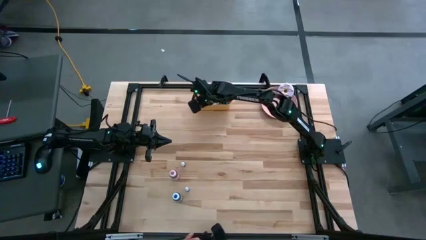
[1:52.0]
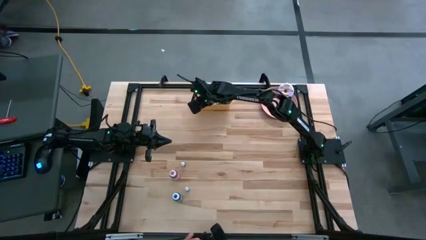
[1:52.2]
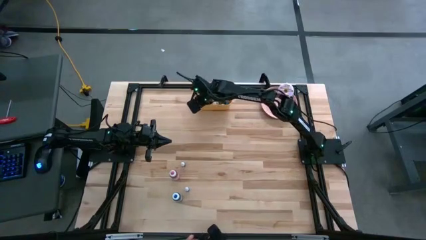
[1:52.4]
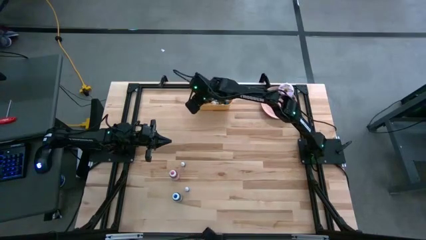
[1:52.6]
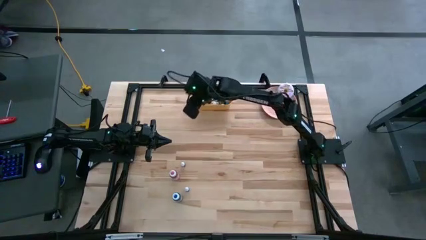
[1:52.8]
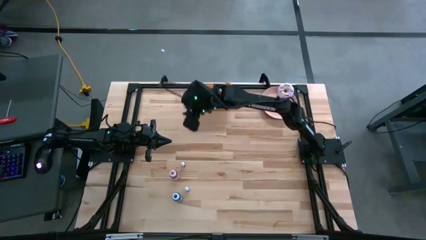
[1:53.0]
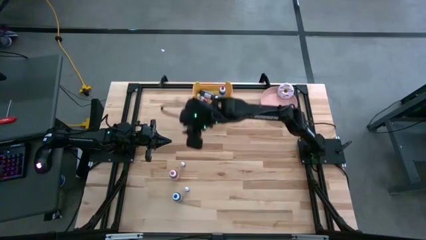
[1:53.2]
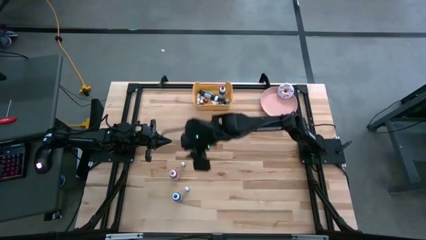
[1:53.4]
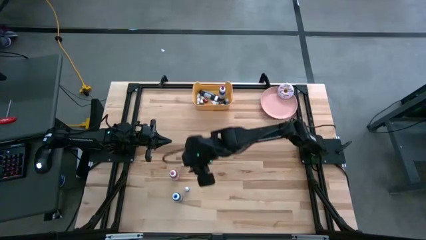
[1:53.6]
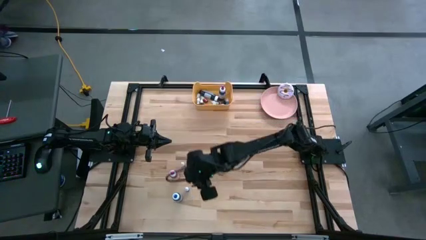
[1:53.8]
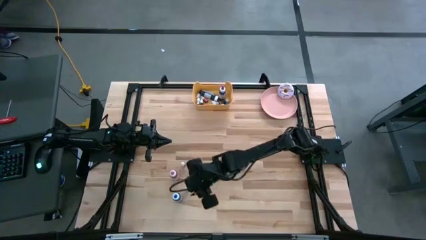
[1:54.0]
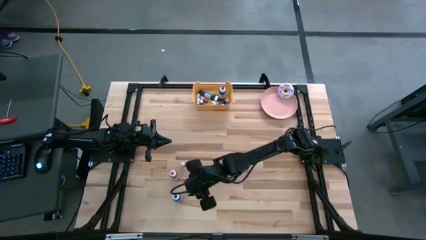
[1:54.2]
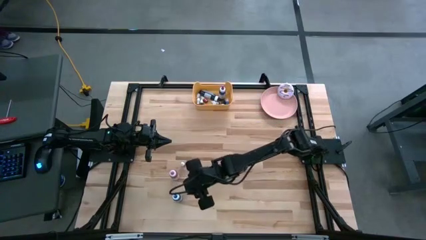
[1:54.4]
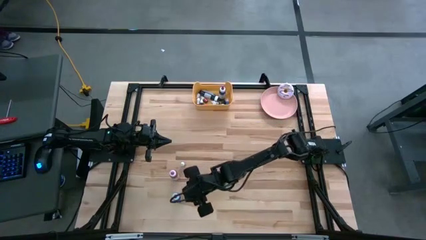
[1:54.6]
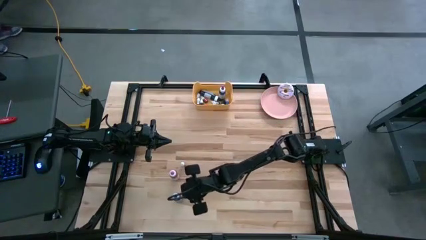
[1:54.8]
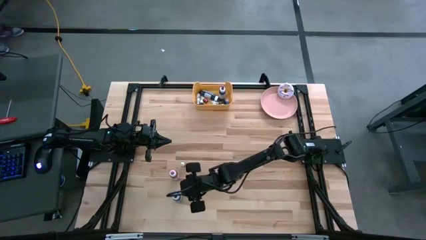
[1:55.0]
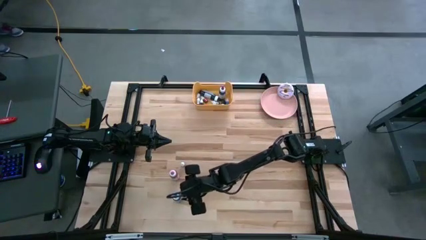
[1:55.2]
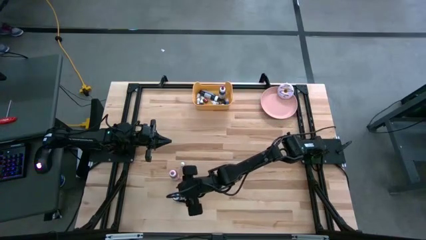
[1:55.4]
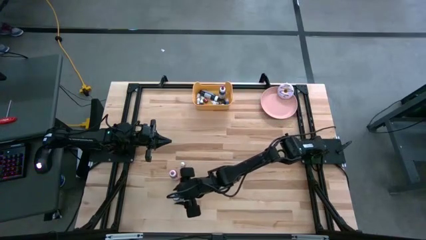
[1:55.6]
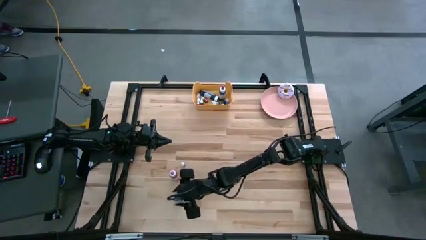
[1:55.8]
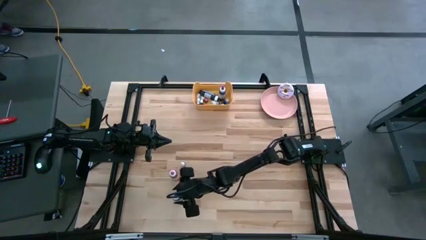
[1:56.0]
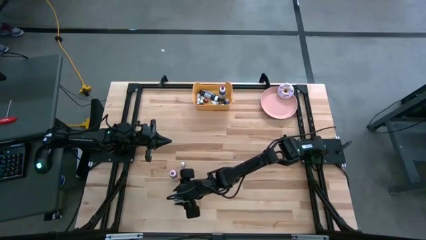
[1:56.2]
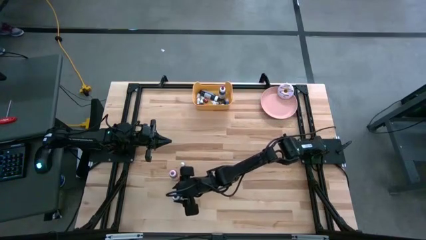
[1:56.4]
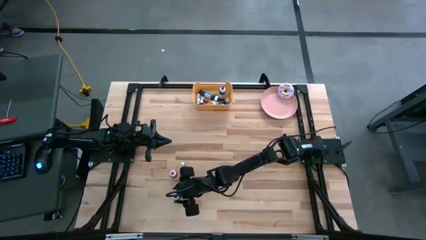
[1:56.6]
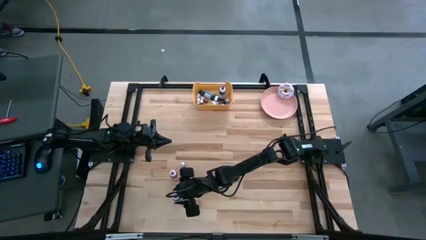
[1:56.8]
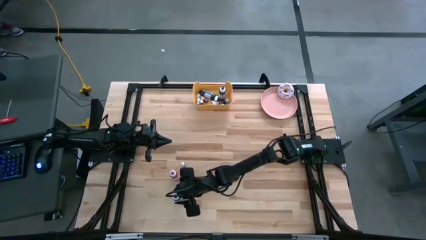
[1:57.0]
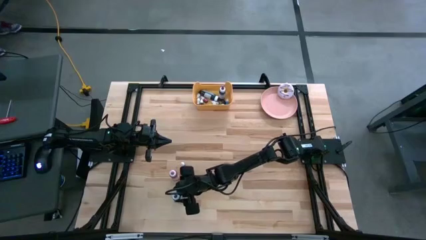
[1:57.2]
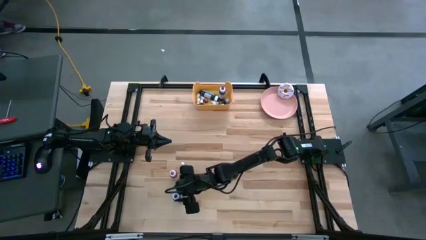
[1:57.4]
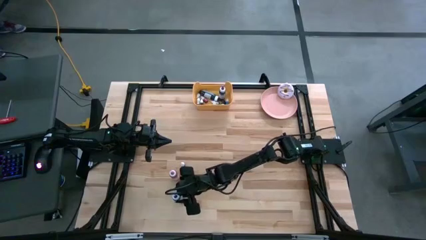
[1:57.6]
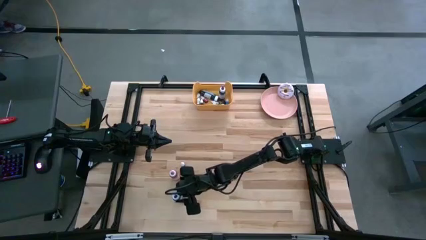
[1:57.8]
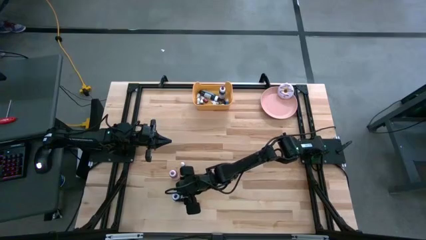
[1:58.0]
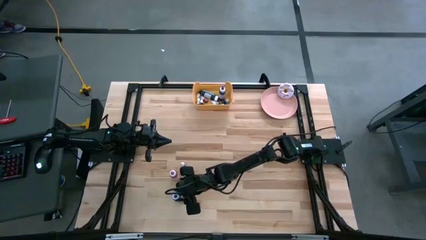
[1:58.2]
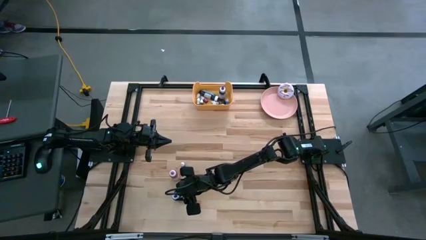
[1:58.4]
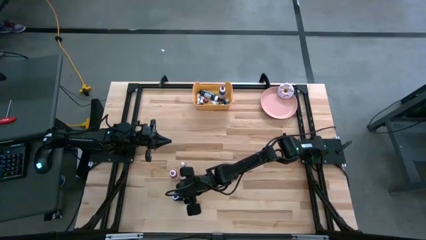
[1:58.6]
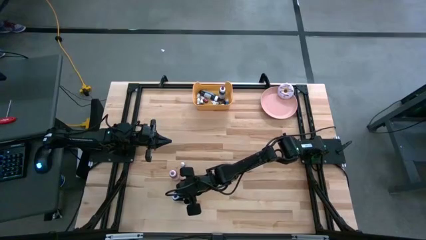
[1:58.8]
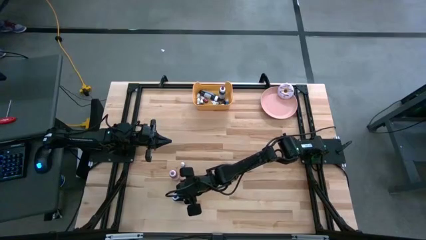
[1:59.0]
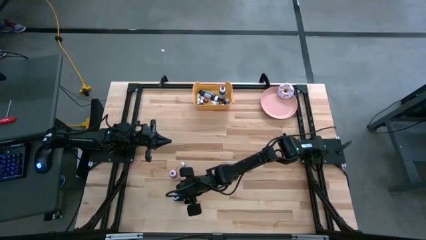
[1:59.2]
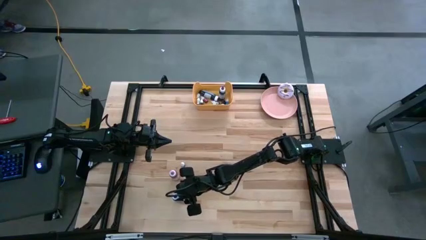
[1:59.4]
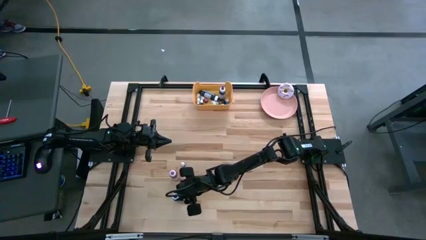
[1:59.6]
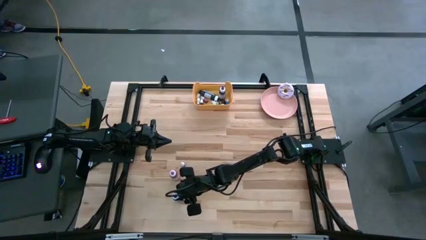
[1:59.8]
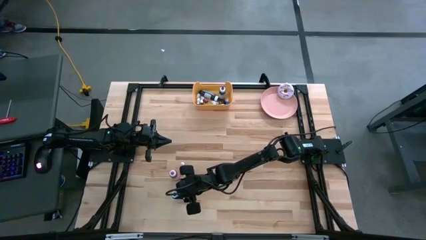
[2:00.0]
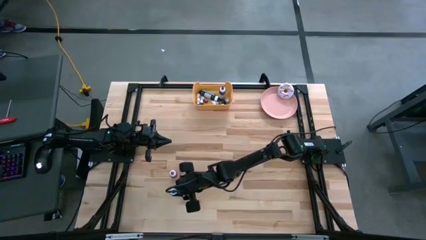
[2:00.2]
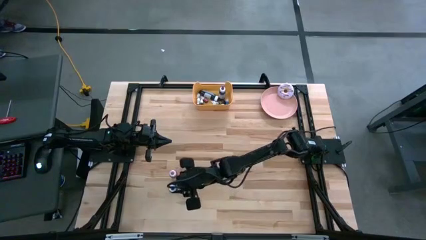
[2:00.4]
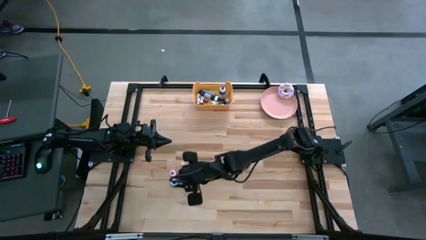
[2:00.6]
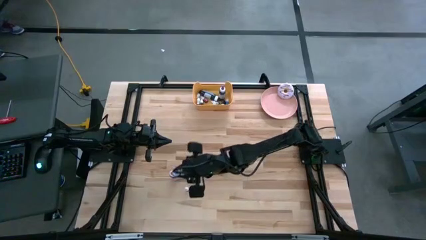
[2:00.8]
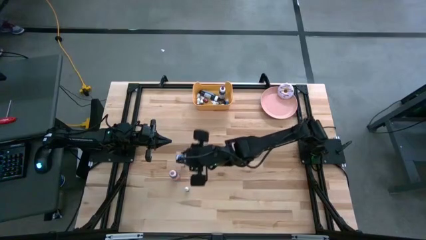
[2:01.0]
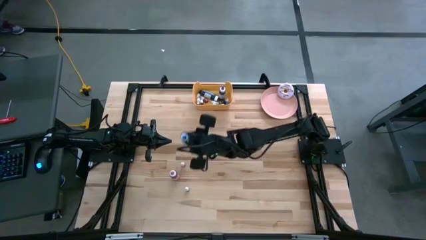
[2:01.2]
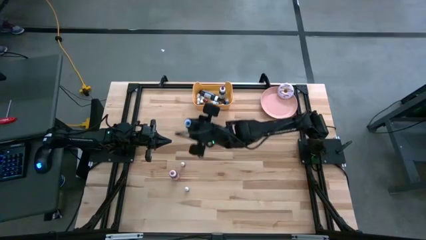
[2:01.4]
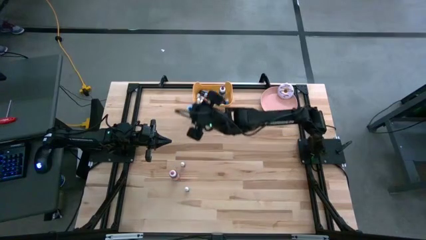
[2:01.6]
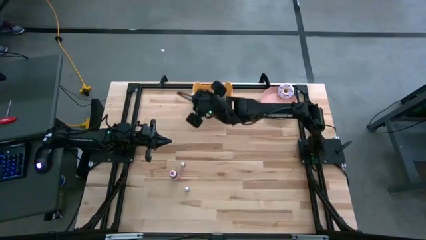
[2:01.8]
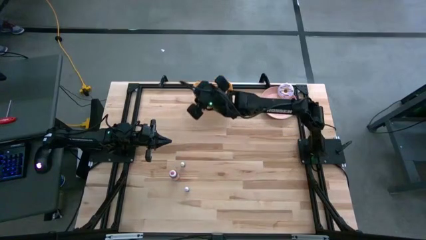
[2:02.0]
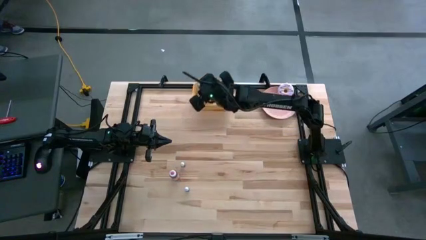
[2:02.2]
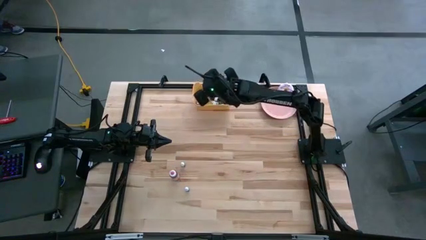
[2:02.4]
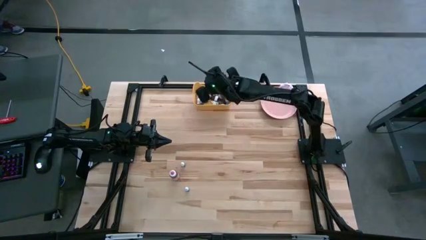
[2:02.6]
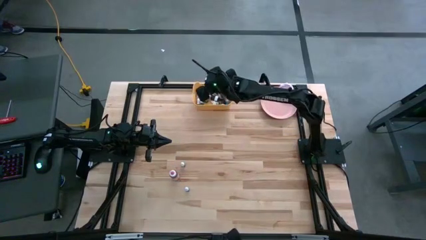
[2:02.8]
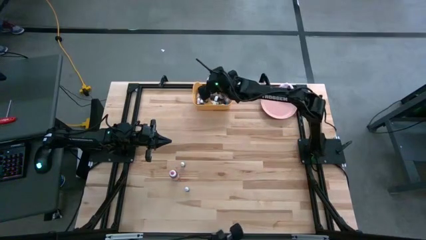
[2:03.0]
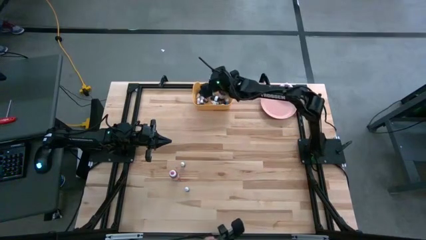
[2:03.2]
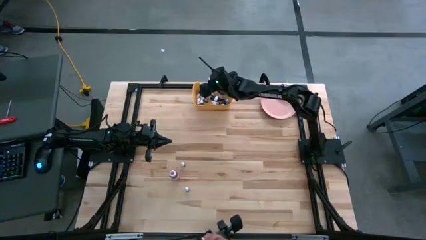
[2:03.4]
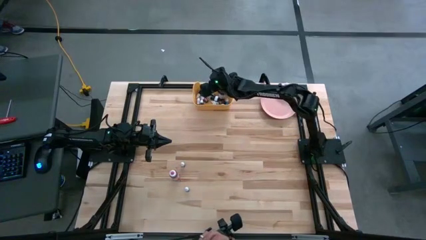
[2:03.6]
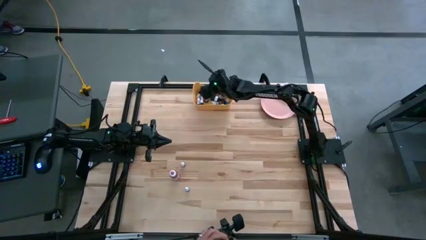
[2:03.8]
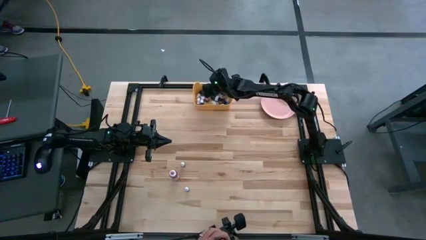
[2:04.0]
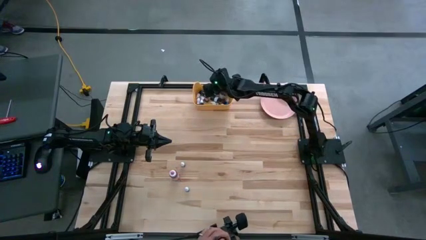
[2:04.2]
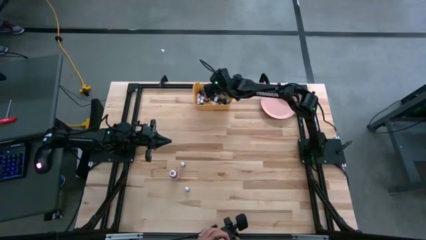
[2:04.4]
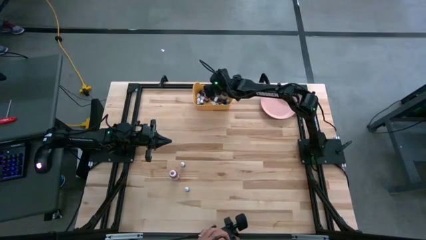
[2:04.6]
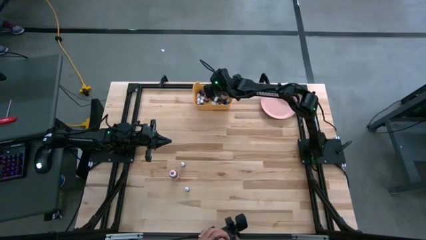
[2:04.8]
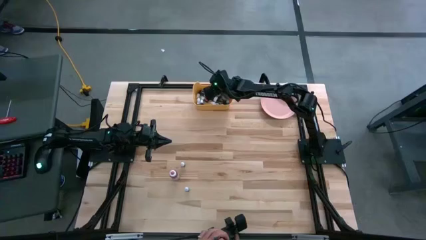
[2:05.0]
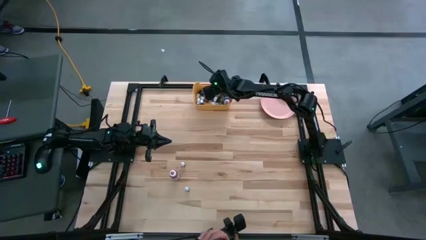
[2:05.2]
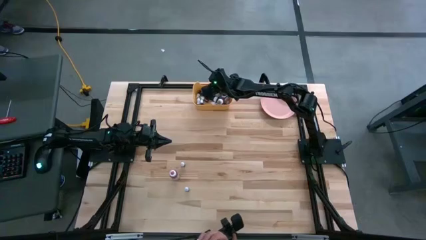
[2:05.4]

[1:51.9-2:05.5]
Task: Pick & Place food coloring
Put the big blue food coloring bottle into the yellow bin

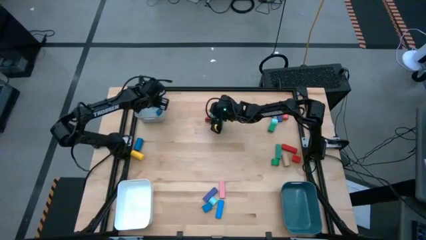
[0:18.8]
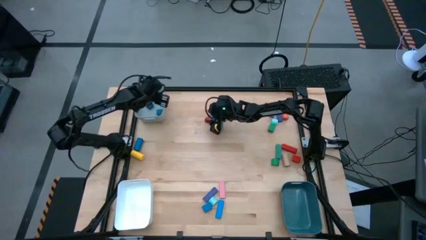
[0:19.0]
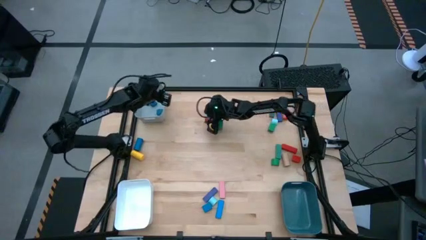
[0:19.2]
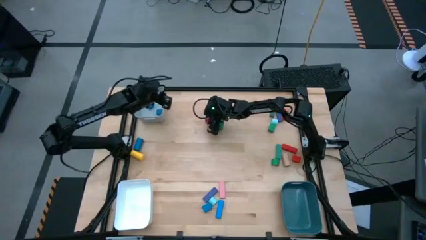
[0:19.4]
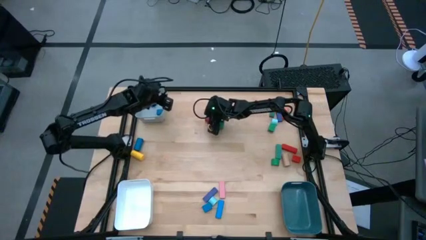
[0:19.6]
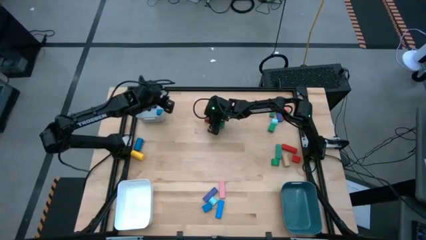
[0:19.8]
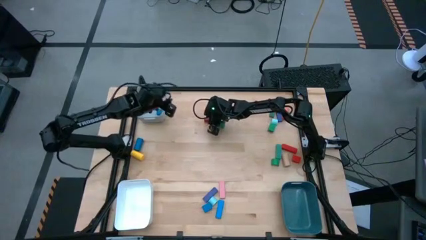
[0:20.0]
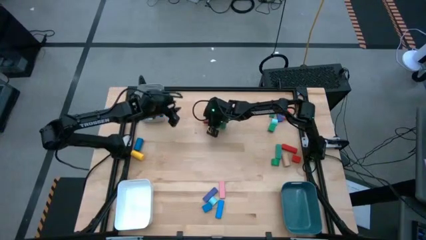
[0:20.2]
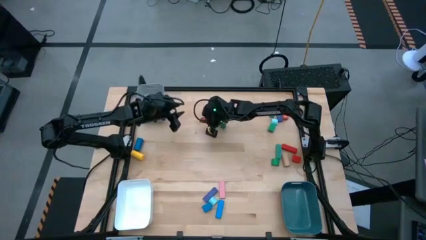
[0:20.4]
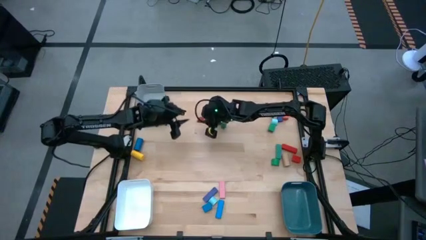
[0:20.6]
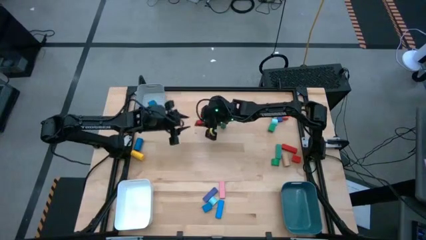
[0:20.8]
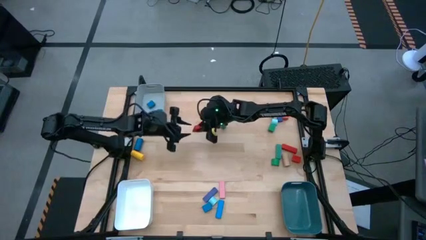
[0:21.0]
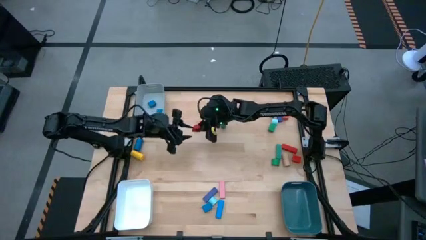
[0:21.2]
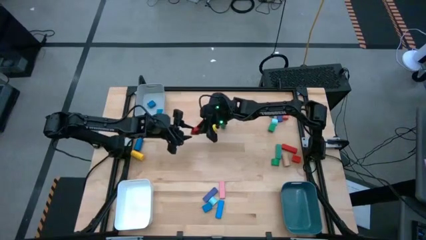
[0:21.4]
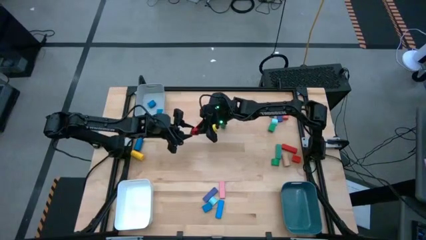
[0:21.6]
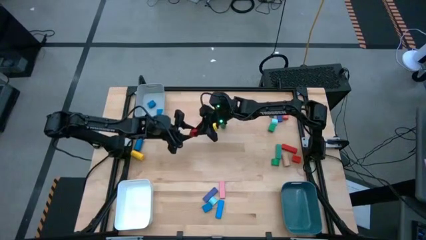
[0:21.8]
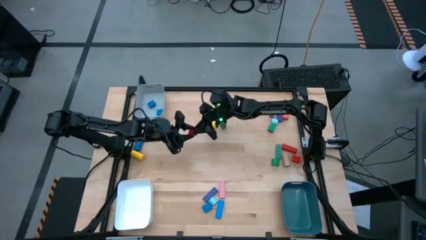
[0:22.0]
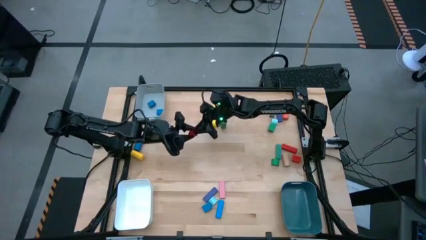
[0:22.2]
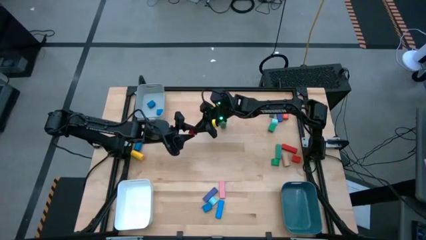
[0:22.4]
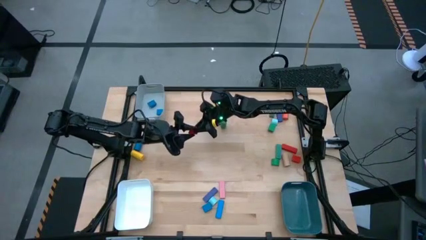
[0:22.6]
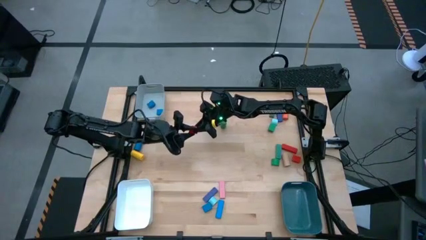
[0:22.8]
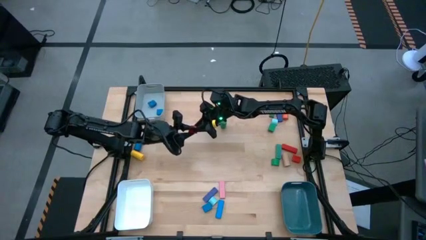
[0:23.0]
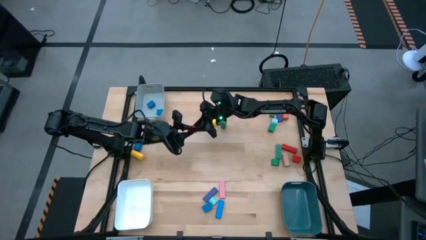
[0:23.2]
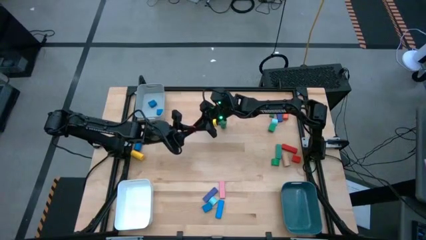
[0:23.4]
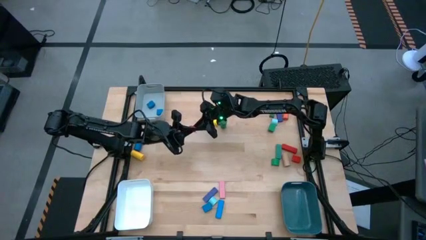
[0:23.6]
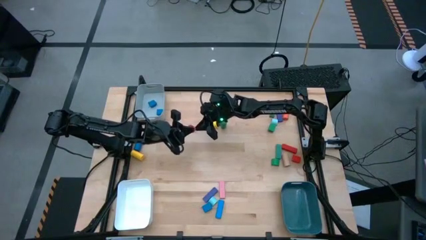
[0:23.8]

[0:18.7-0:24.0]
Task: Sort blocks by size
Put the red half-circle block into the gray bin
